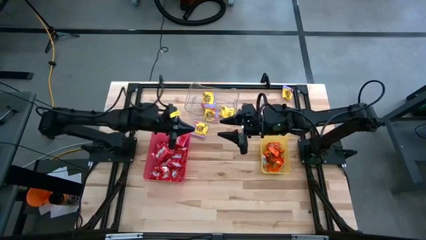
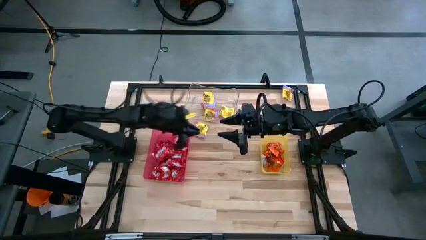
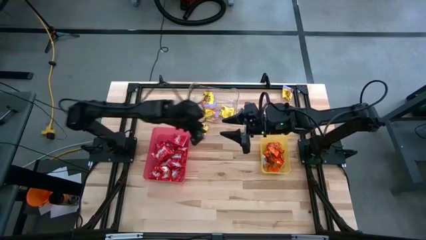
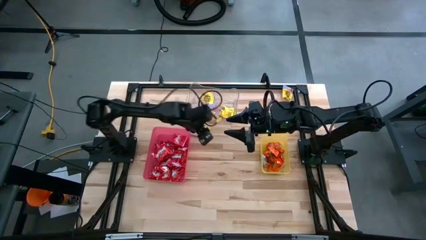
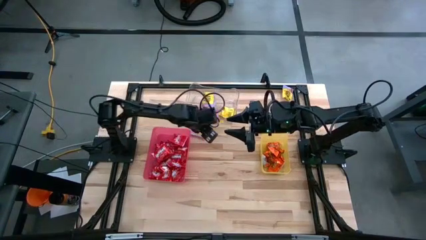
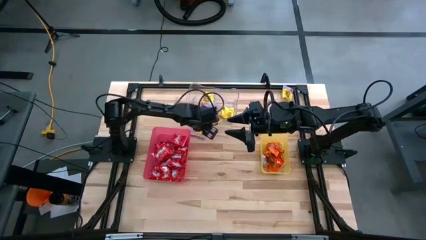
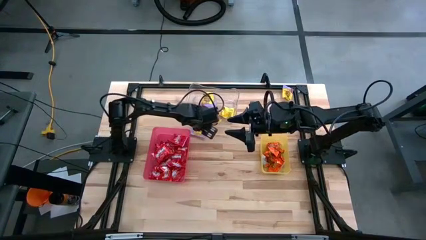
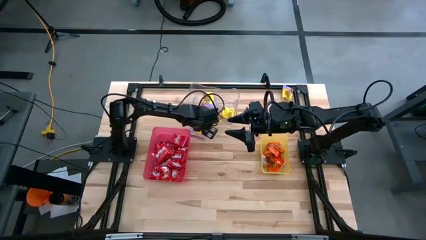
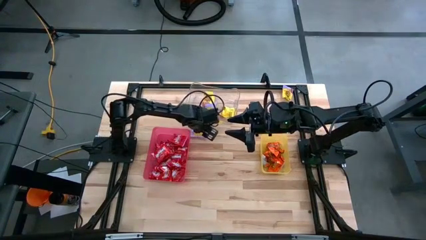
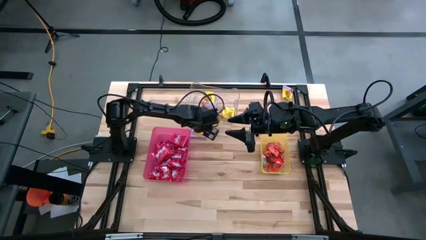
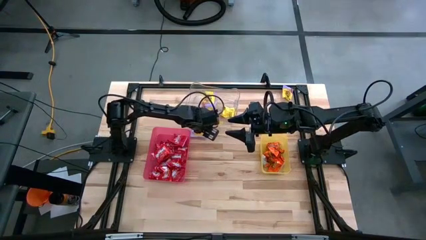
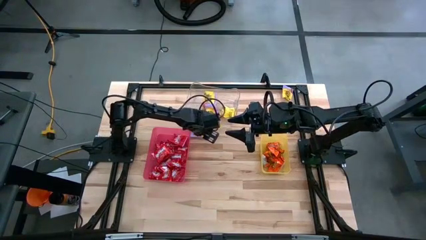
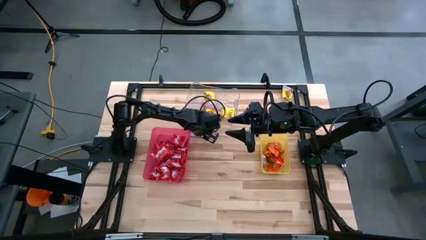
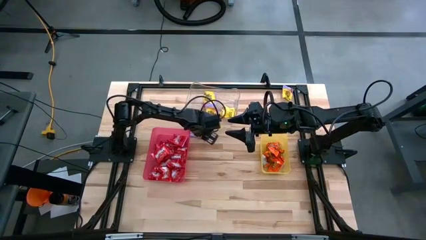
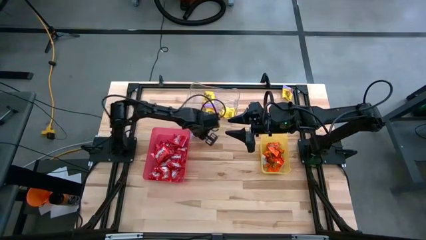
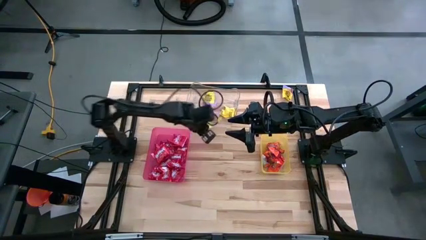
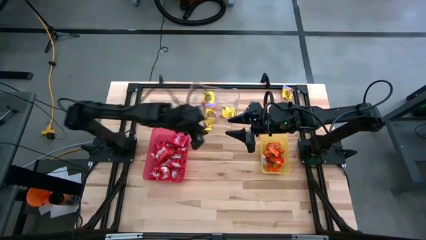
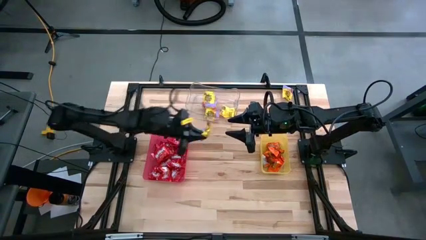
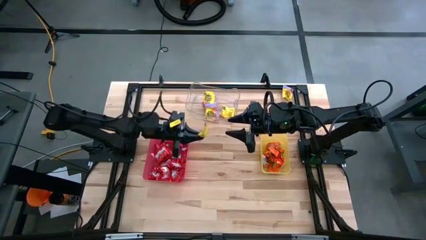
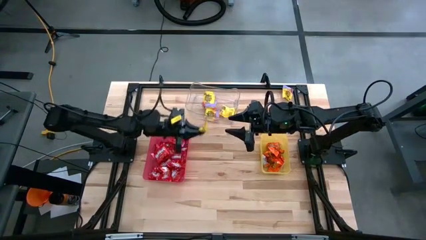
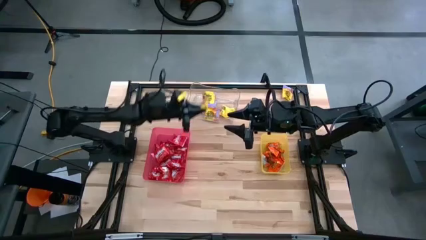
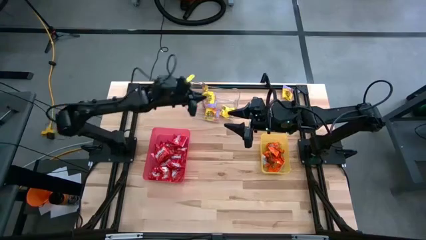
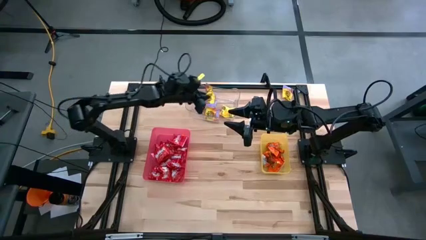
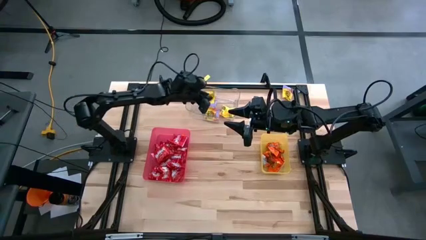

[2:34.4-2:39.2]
Task: Sort candy
Put the yellow candy into the transparent bin

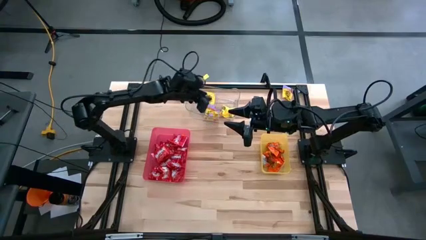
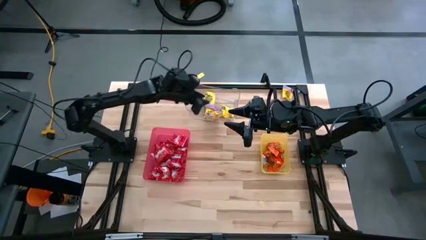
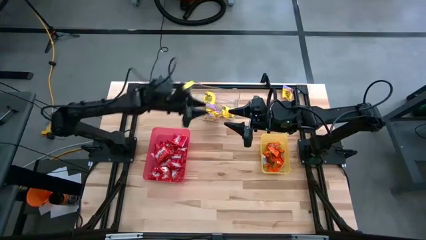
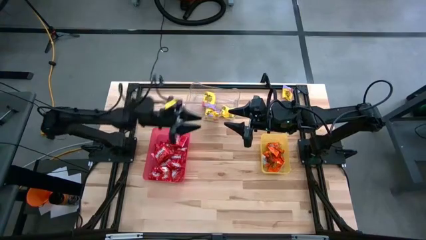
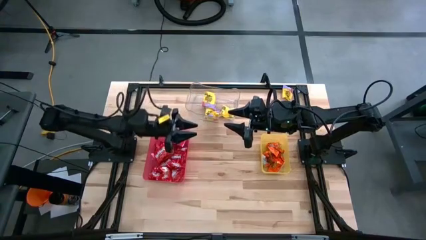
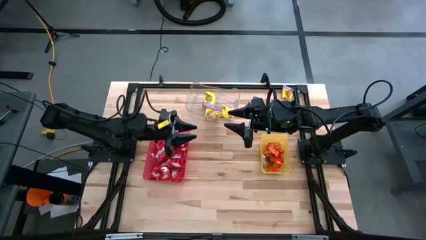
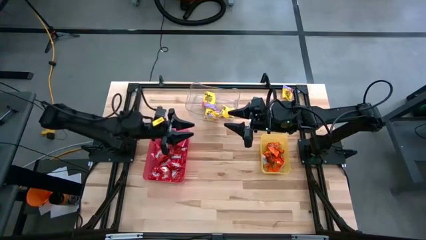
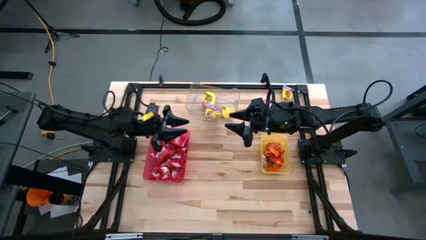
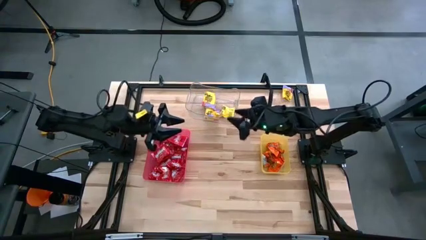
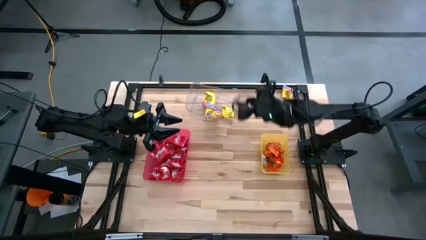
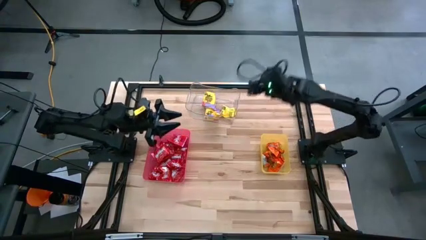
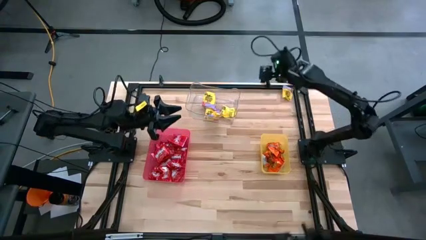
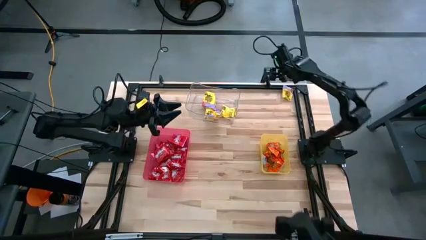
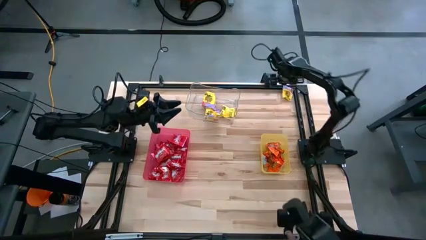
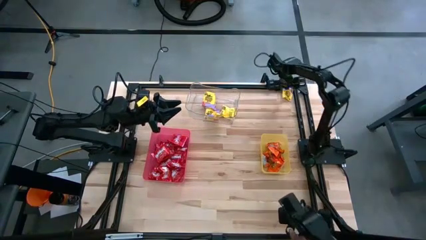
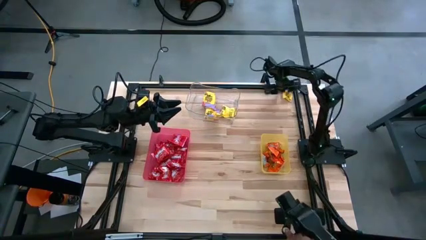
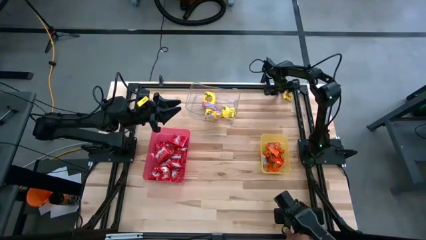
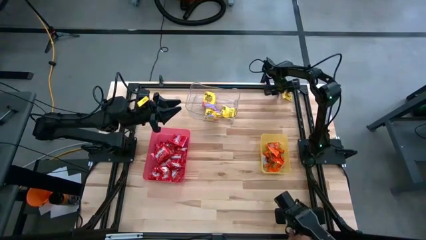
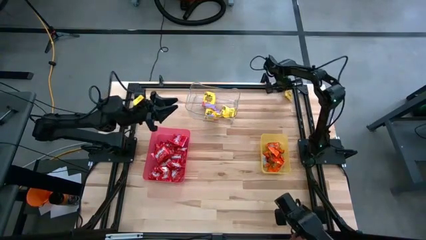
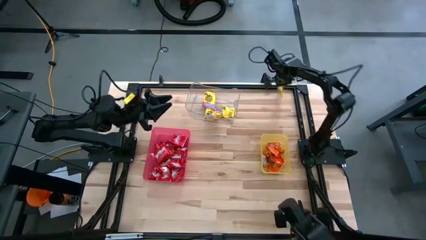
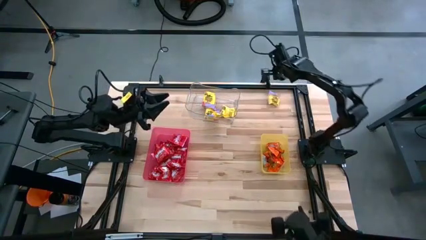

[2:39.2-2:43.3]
Put the yellow candy into the transparent bin

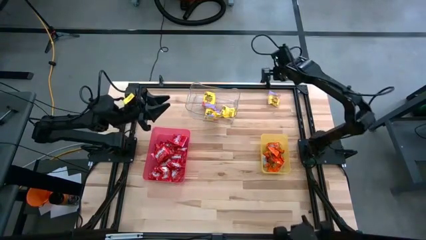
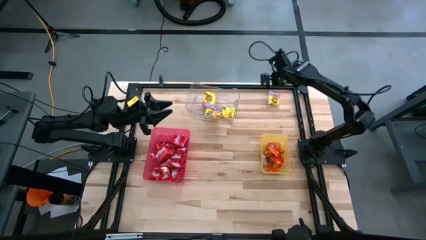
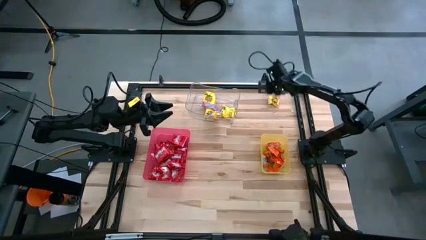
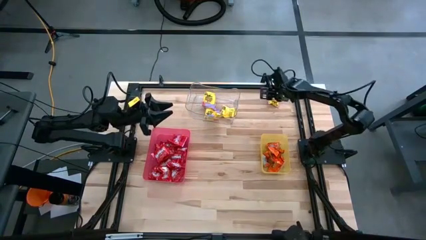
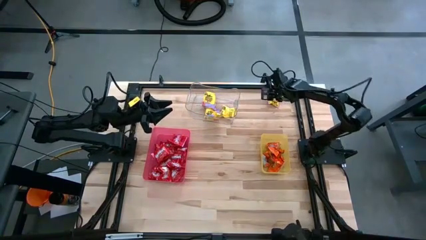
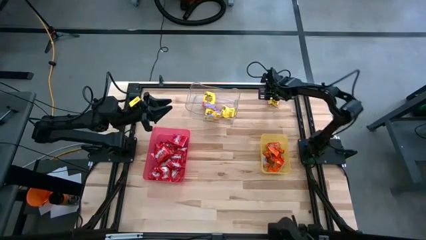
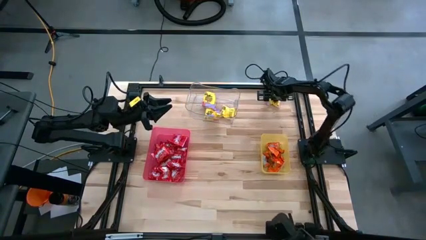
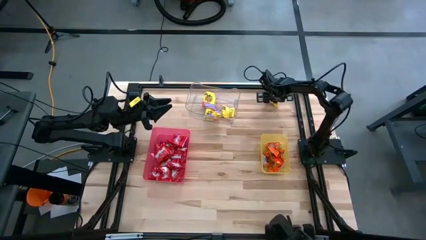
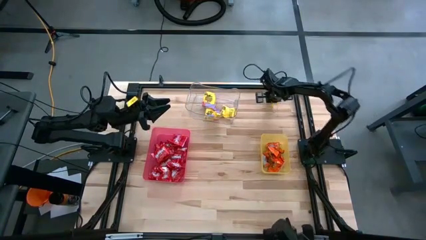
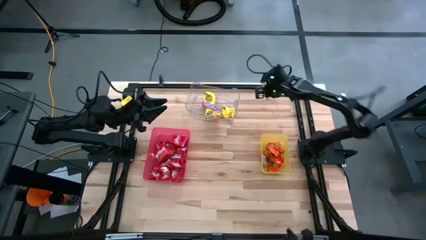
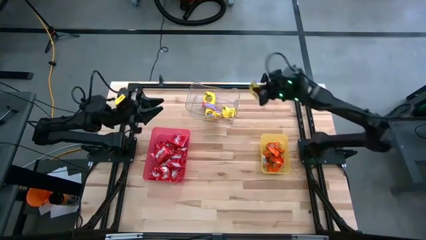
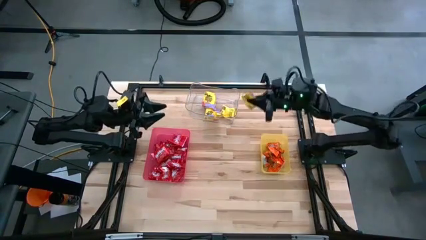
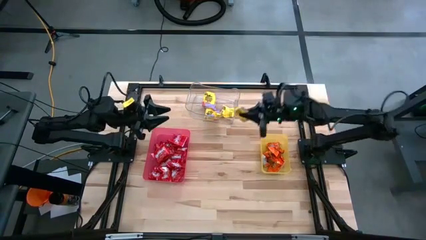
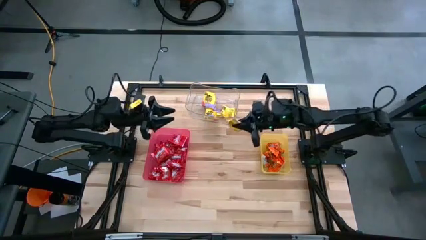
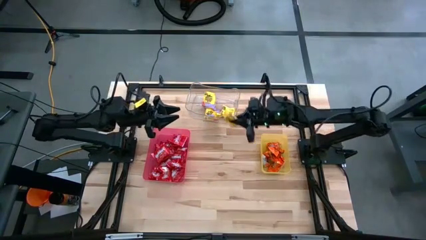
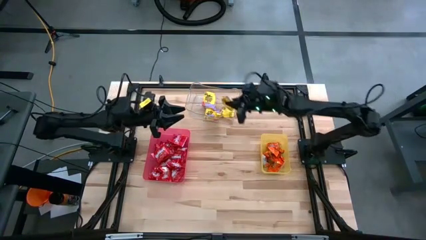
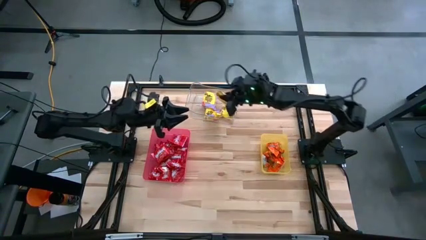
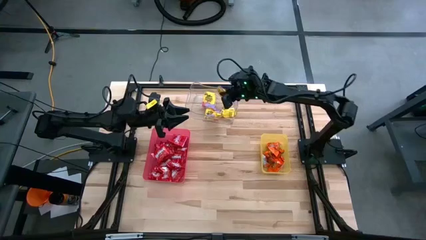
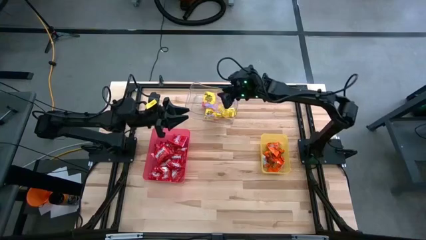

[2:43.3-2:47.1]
Put the yellow candy into the transparent bin

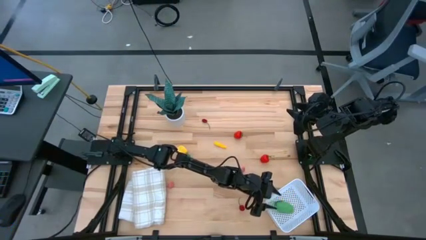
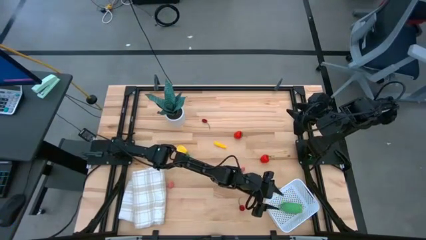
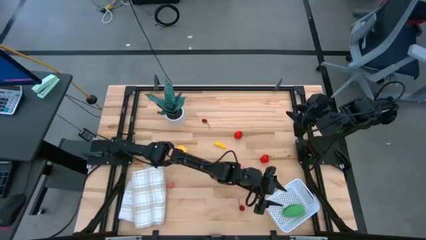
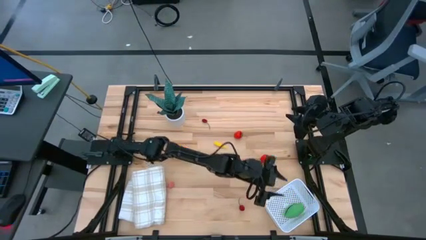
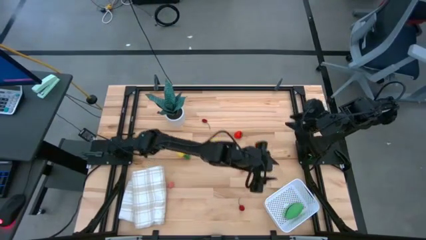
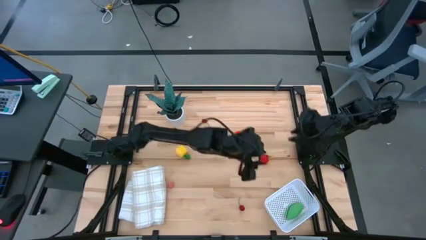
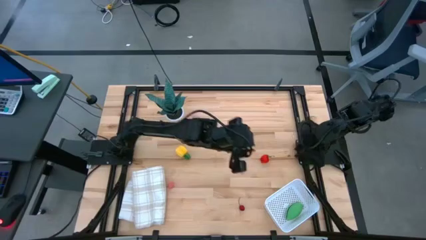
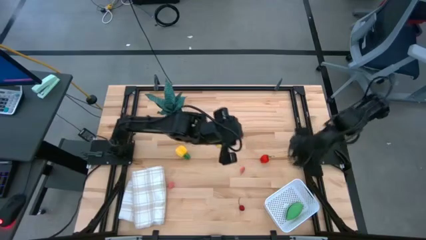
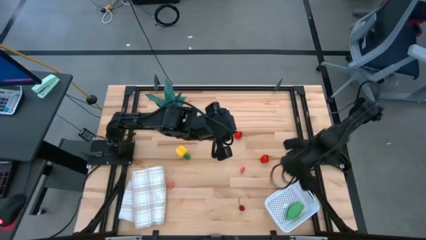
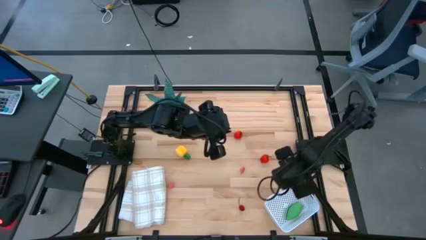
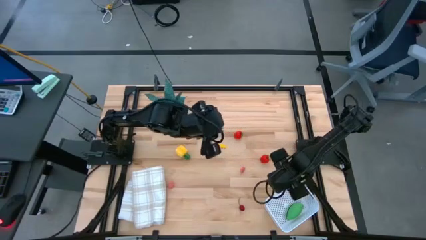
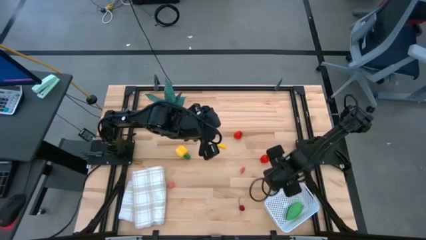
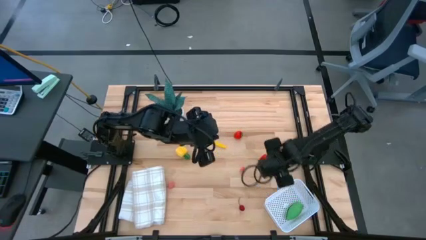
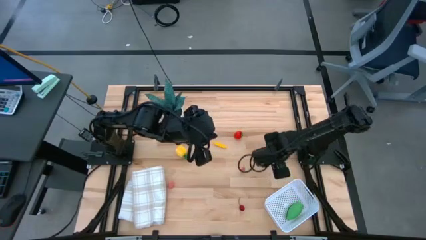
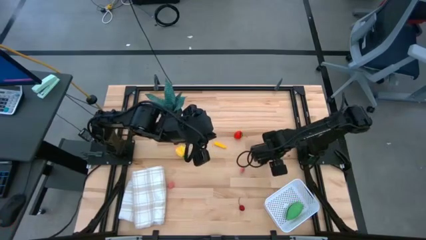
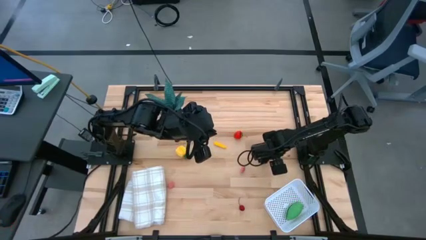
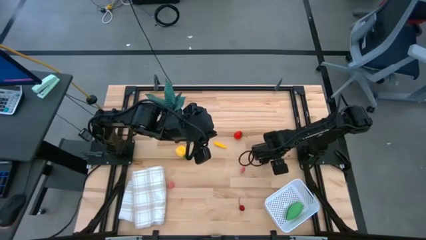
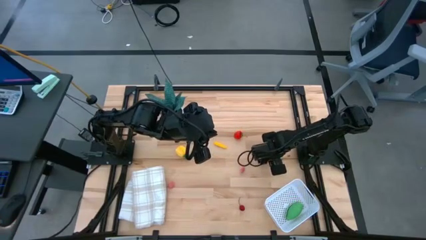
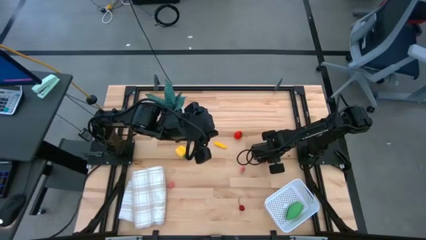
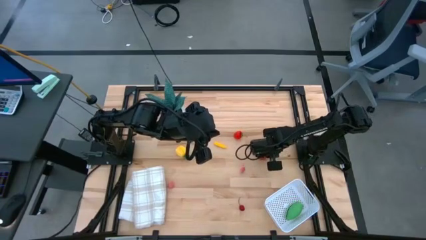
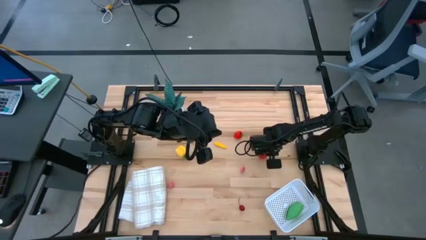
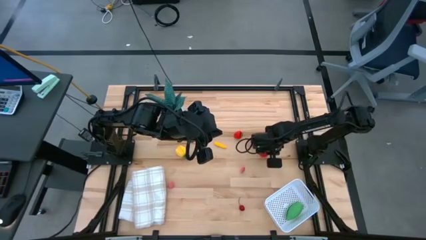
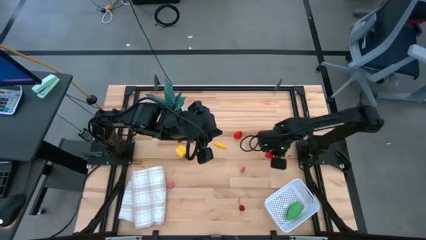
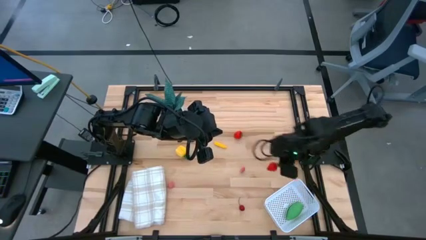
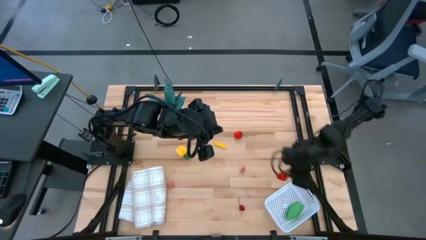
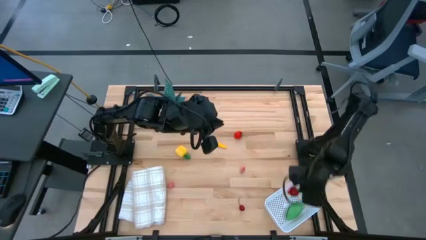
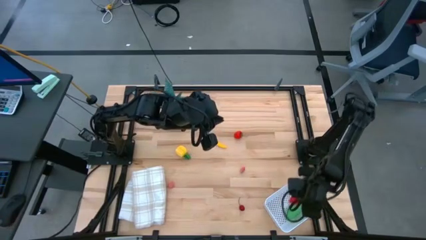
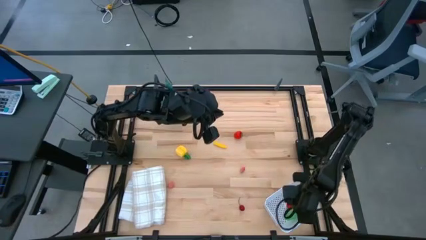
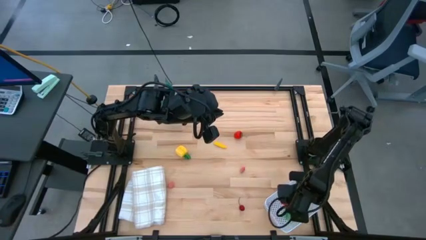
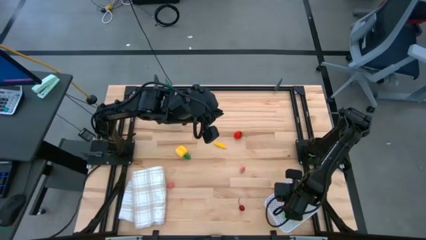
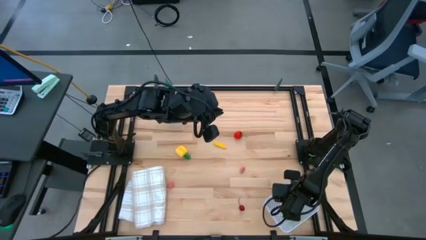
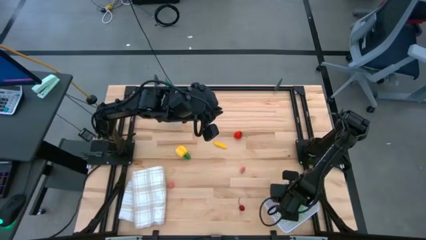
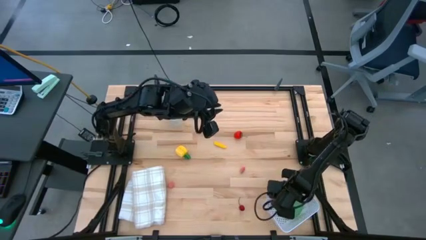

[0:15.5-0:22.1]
Task: Pick and placing Produce into tupperware
Put the right red strawberry into the white basket
